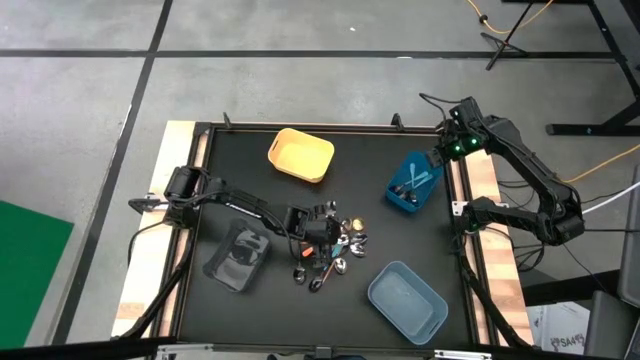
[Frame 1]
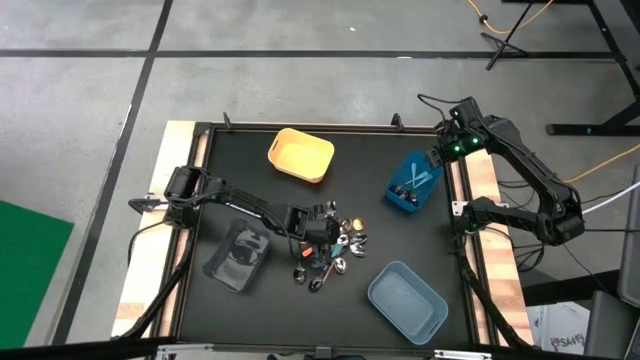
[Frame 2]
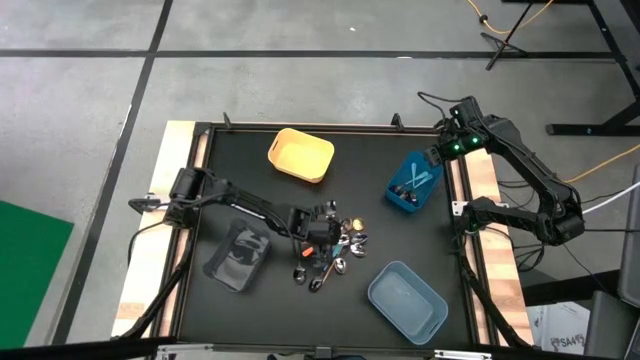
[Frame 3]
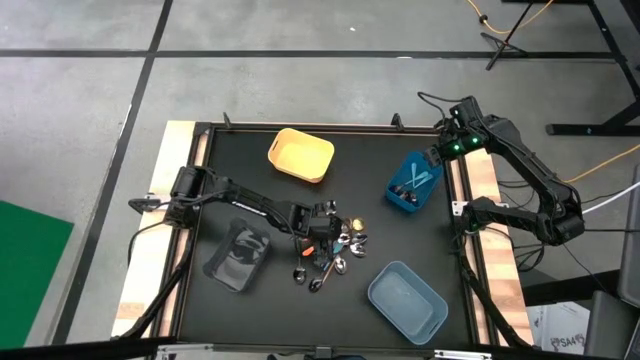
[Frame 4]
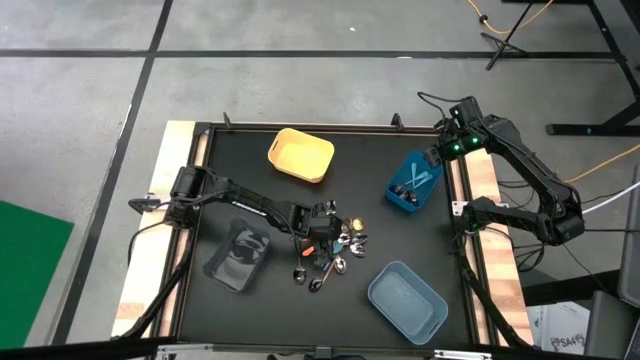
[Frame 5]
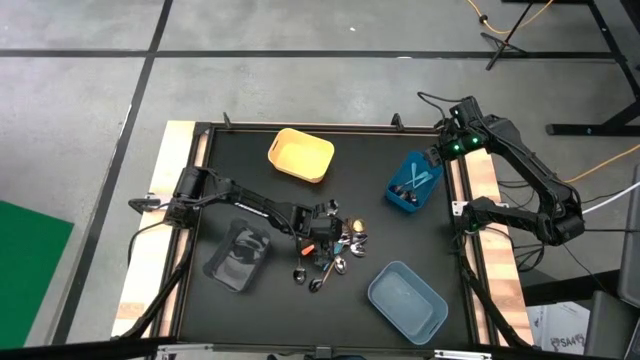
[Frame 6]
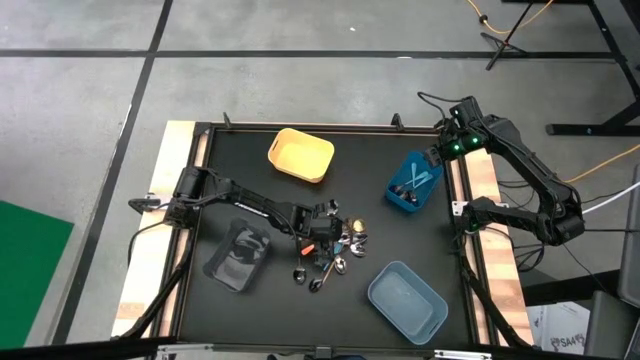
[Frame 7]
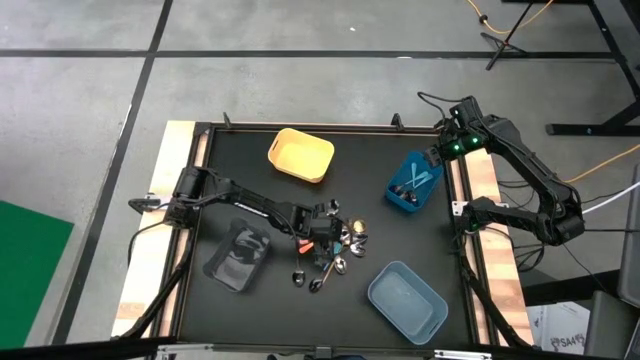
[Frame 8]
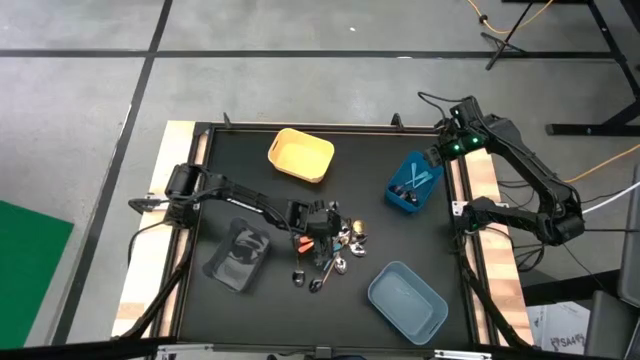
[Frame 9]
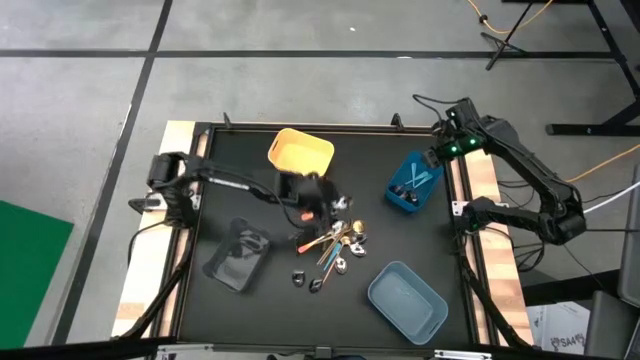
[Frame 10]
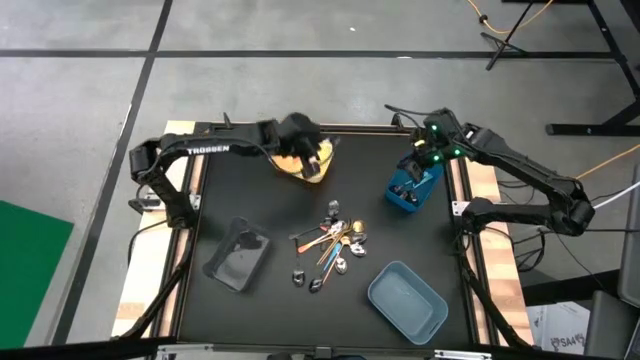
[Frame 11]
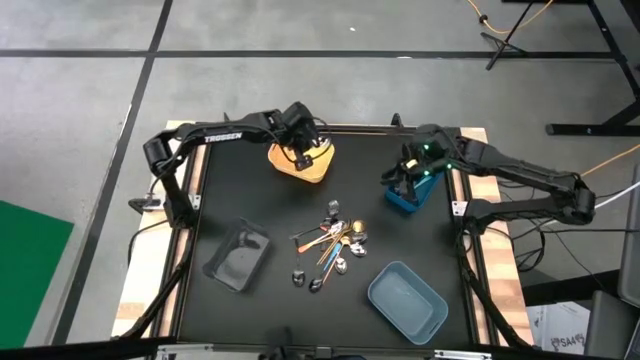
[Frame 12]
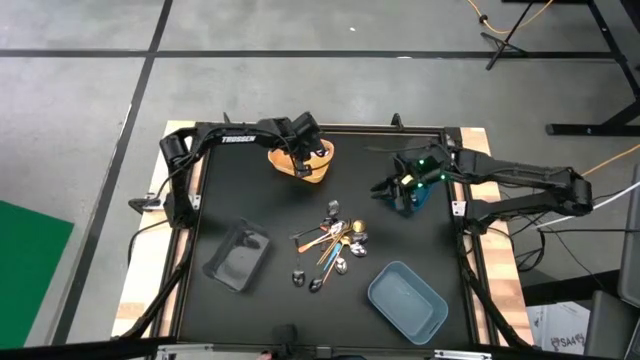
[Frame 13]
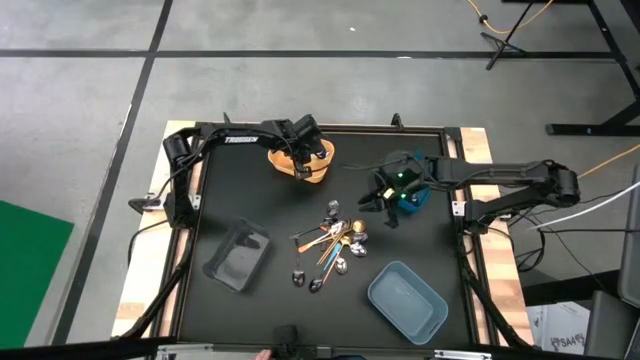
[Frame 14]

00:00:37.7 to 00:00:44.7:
Task: Sort silverware by color (type)
Put the orange spoon into the yellow bin

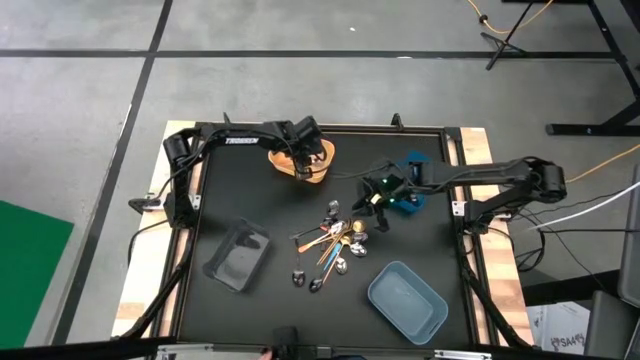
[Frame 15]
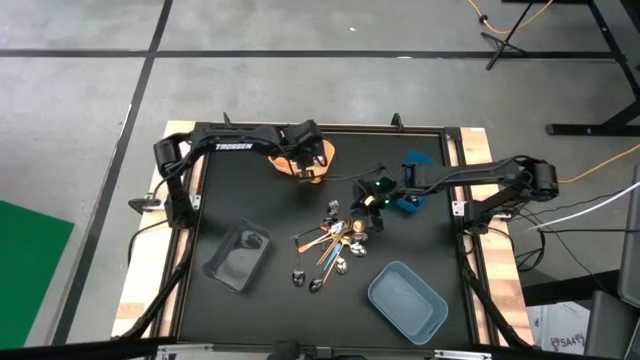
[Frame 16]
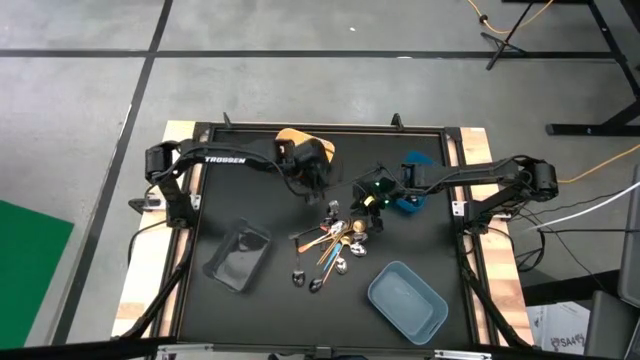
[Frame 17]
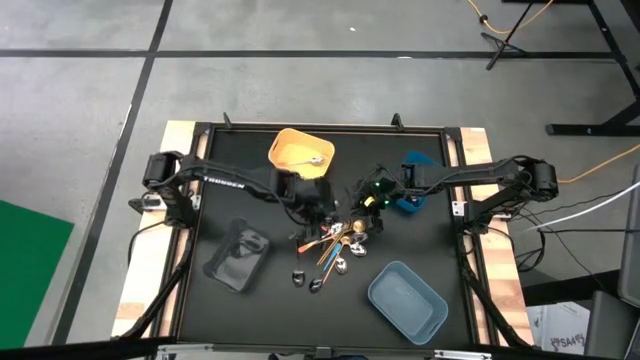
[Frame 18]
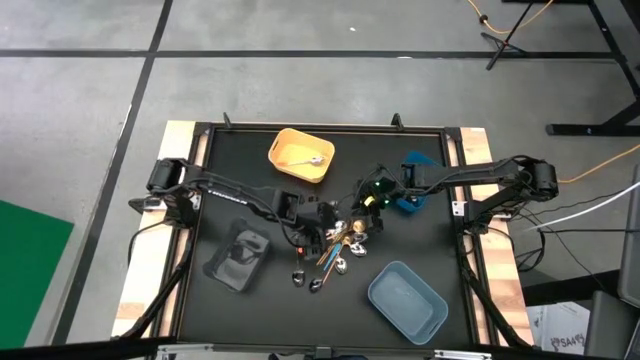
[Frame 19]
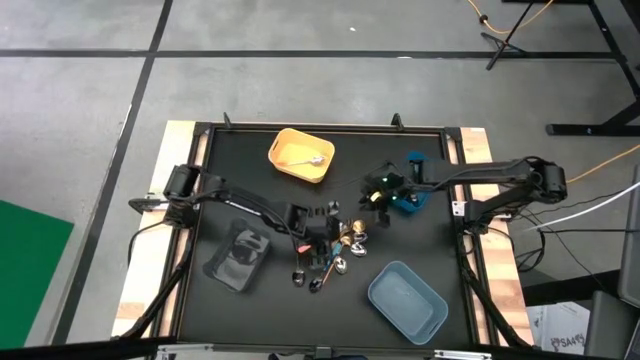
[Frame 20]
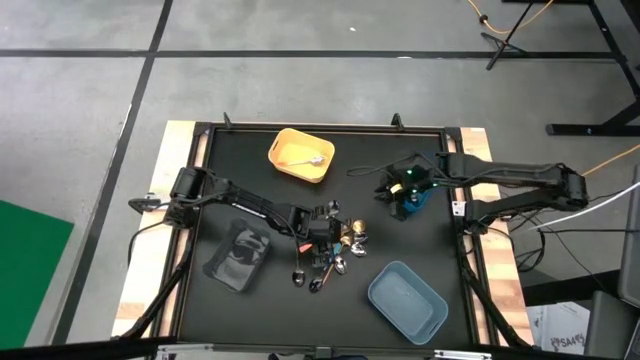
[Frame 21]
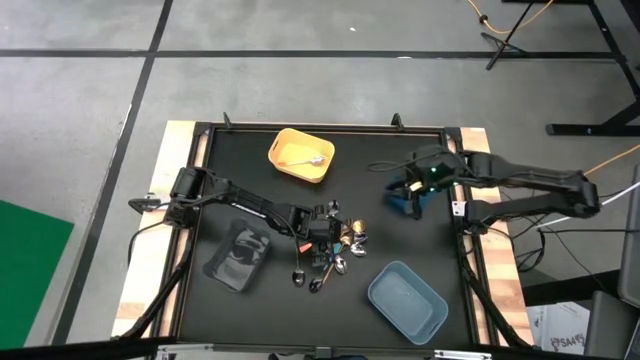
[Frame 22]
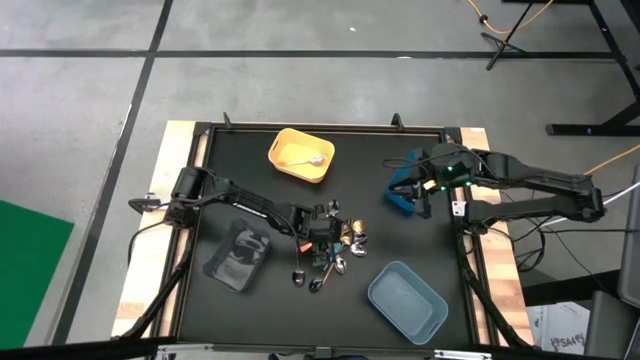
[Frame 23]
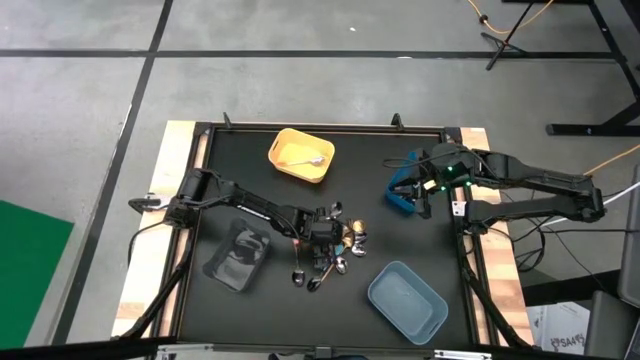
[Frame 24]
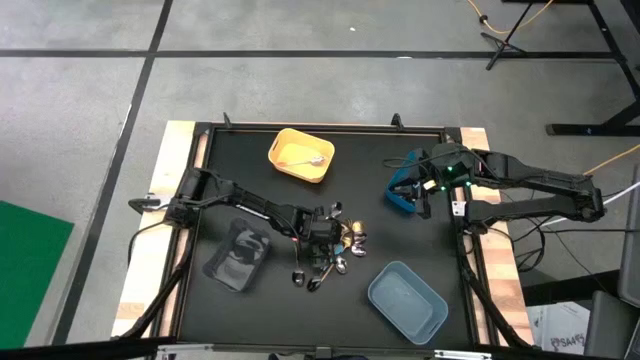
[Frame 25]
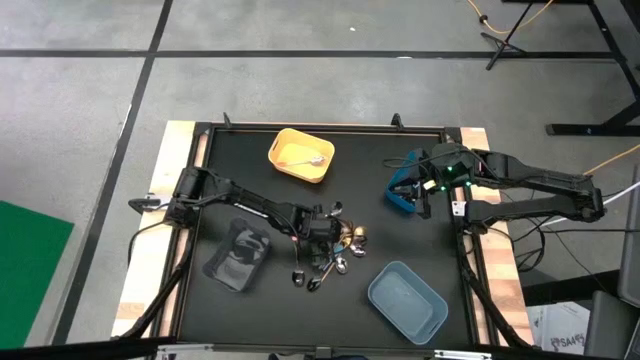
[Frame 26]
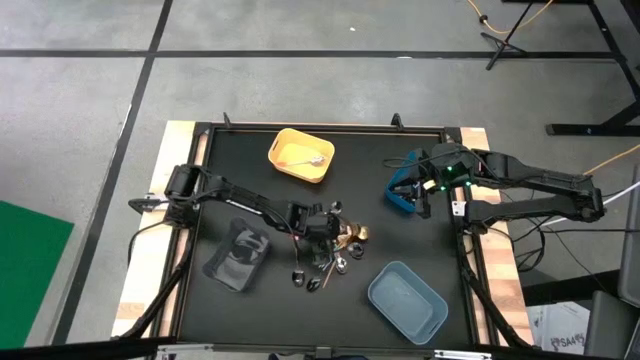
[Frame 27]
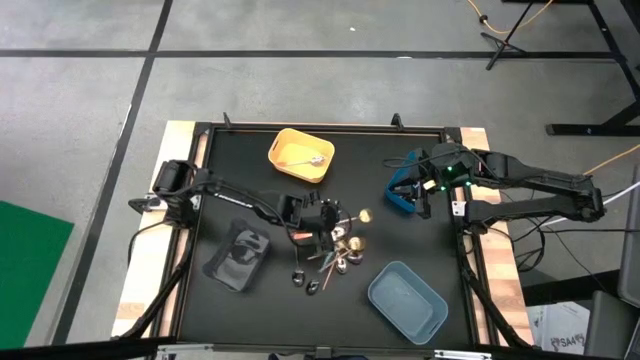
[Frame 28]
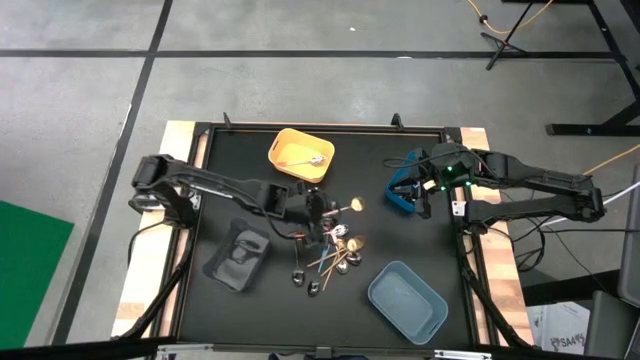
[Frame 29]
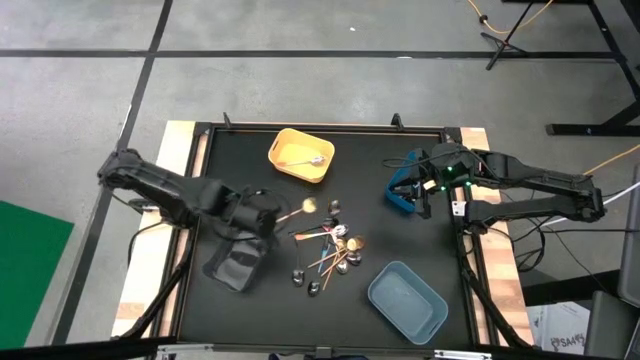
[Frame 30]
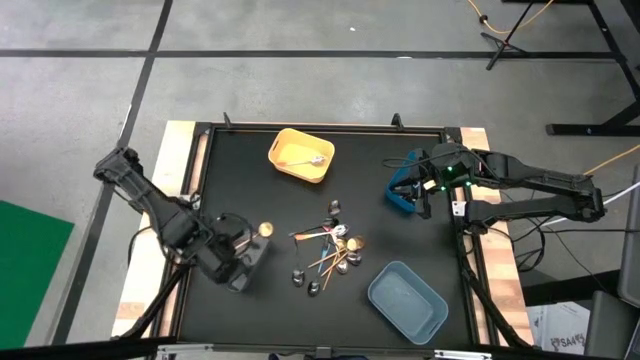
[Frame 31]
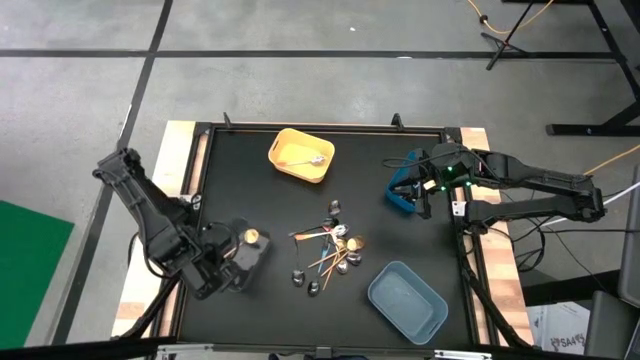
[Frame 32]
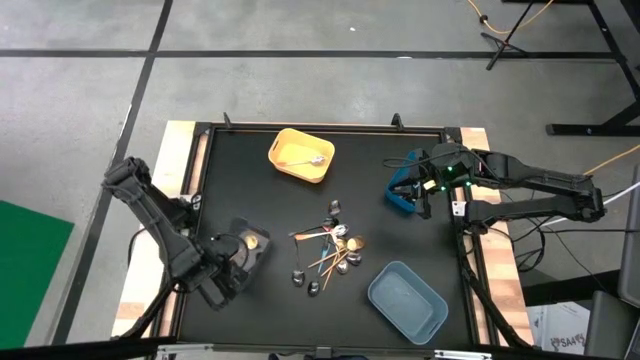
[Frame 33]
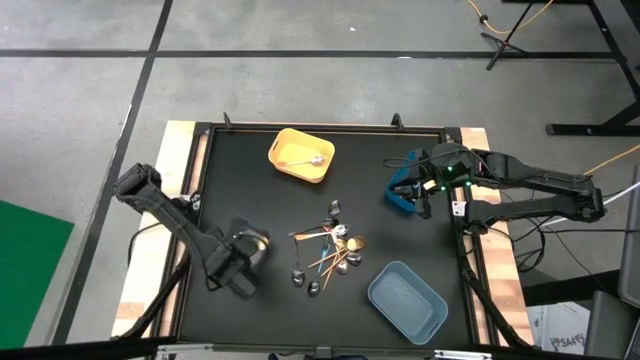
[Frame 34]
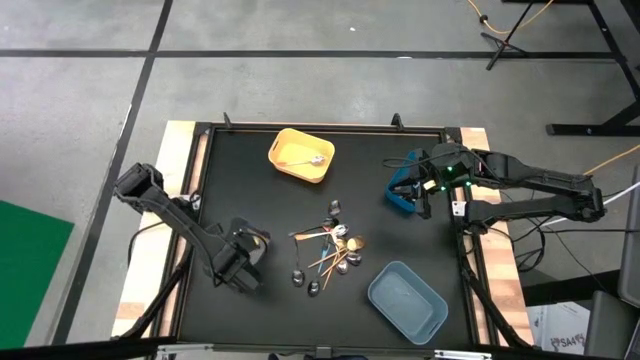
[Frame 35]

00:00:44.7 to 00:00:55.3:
Put the gold spoon into the black bin

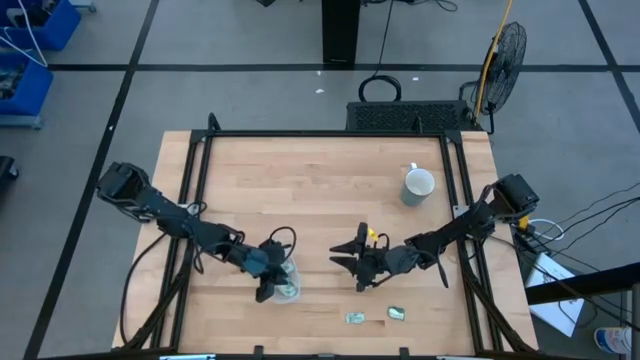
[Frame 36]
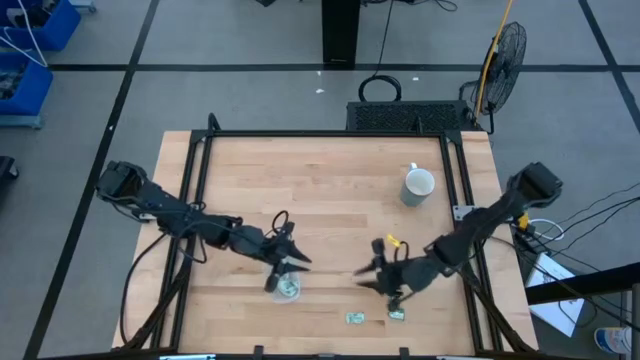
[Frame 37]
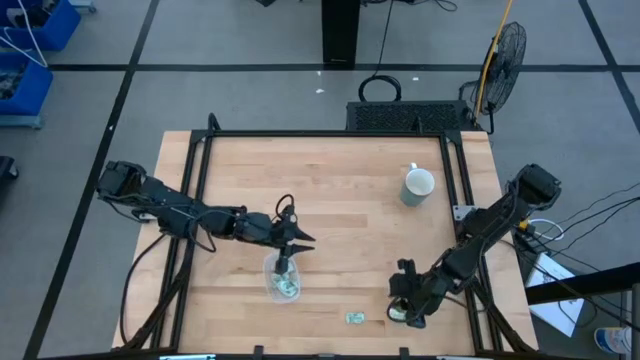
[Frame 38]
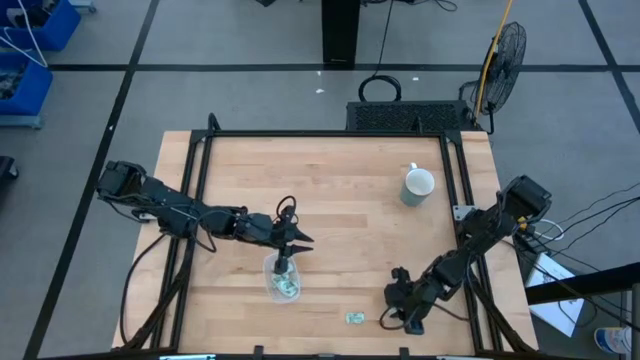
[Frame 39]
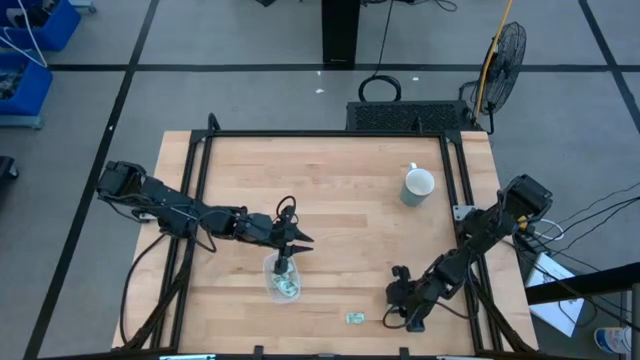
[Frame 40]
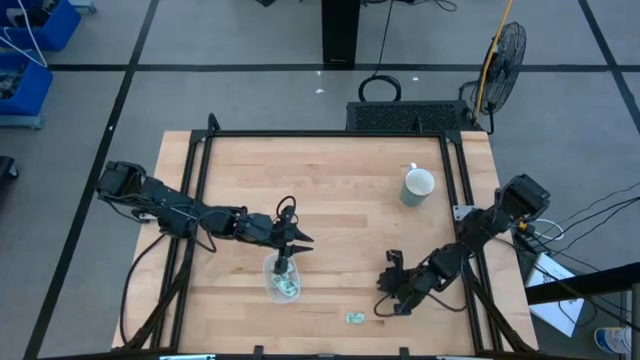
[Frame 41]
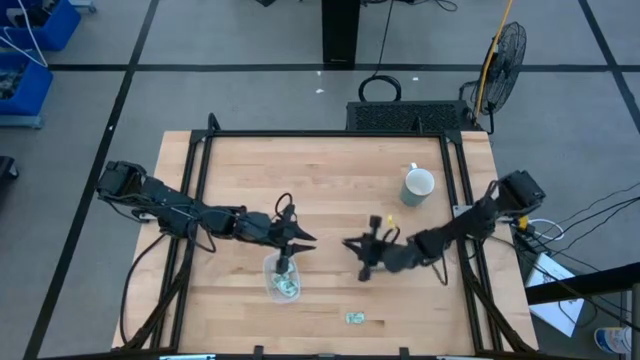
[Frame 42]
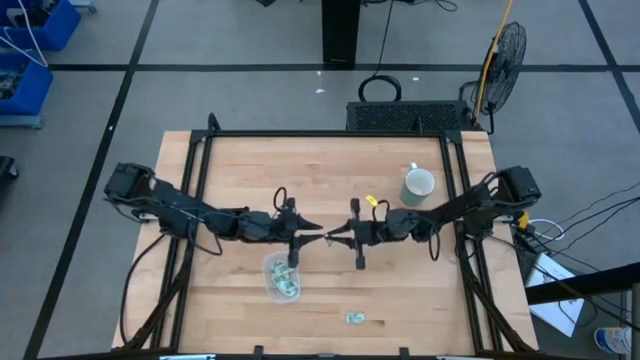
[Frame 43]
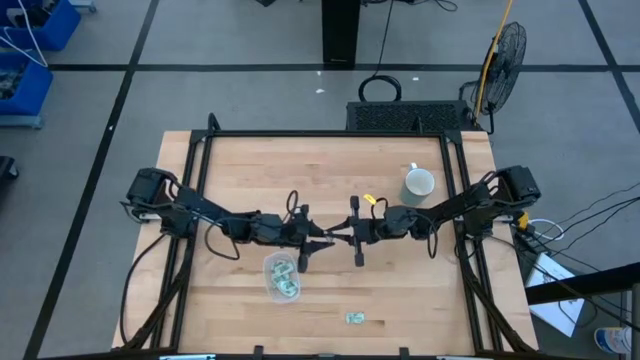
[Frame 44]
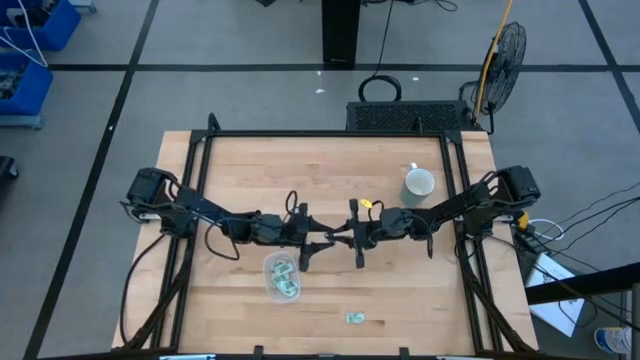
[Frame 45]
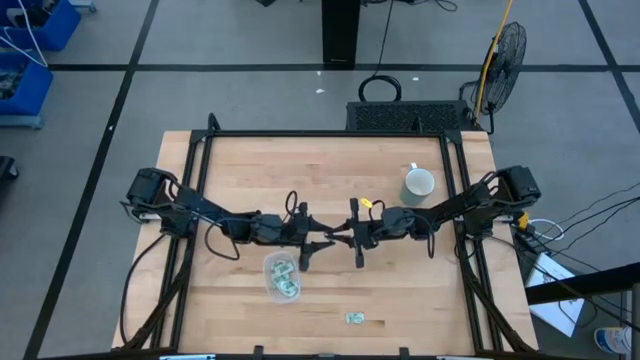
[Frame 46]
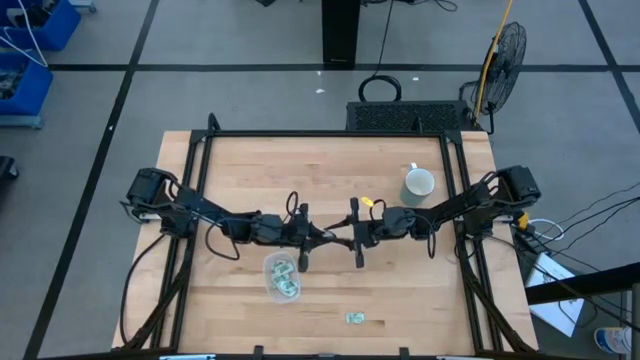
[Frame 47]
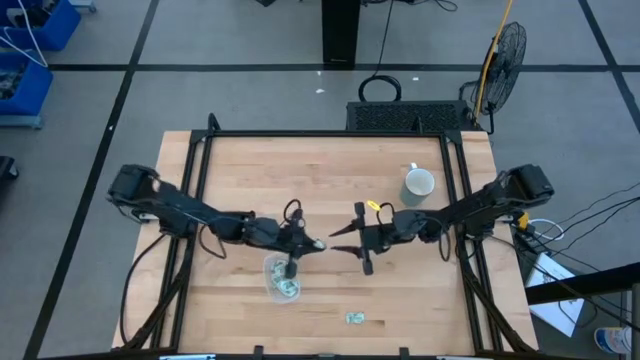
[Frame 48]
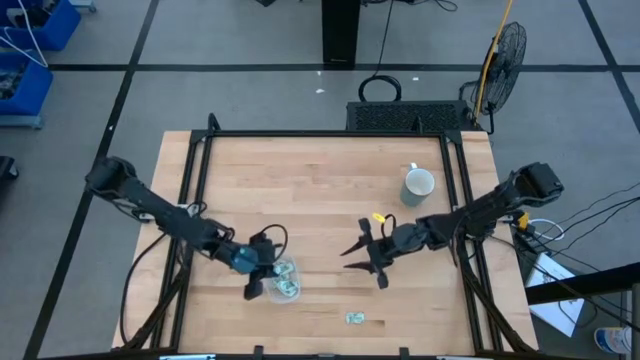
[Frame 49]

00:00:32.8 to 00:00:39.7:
Task: Pick and place Stevia / Truvia into bins
Put the truvia packet into the transparent container
